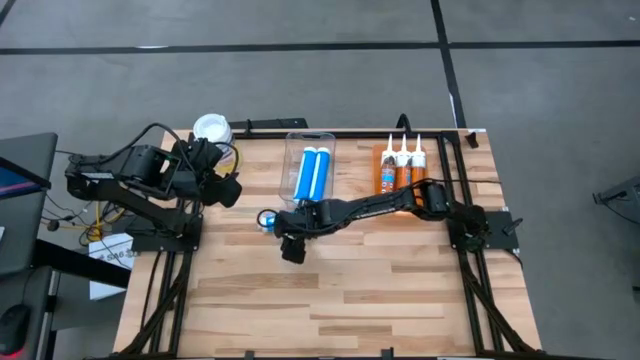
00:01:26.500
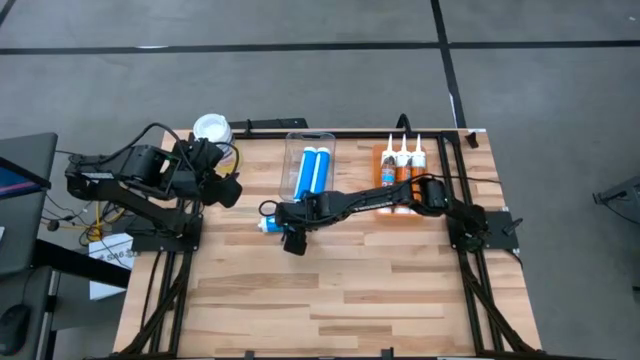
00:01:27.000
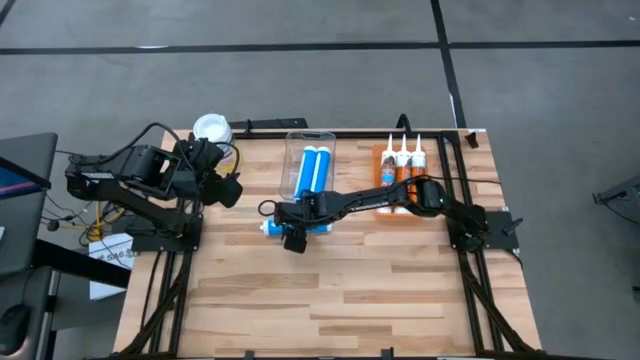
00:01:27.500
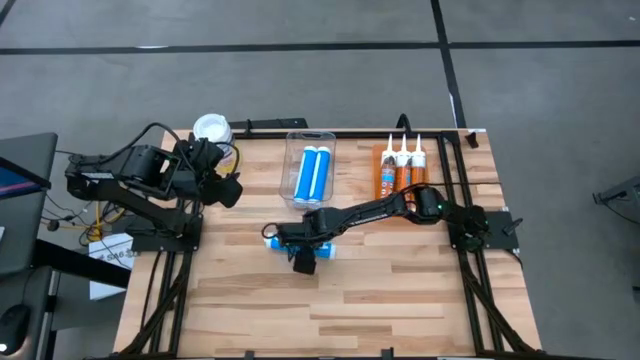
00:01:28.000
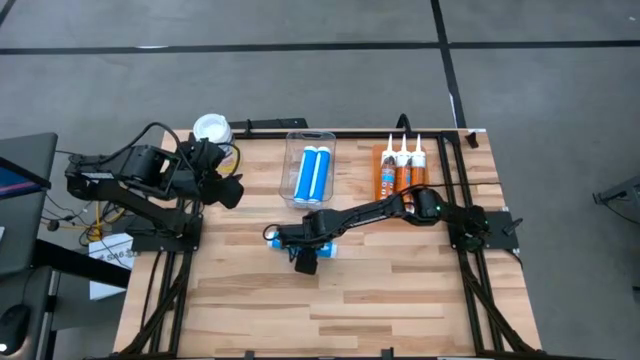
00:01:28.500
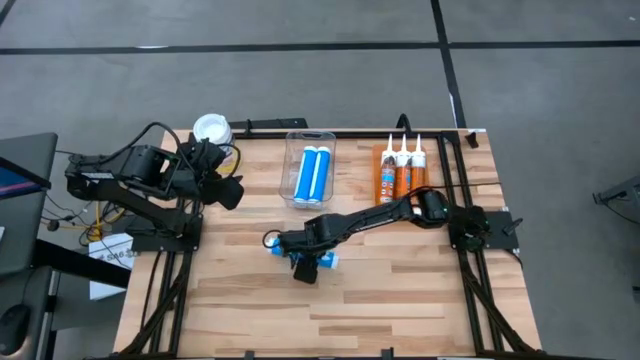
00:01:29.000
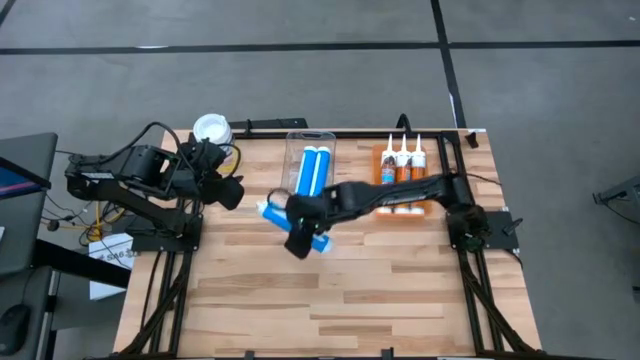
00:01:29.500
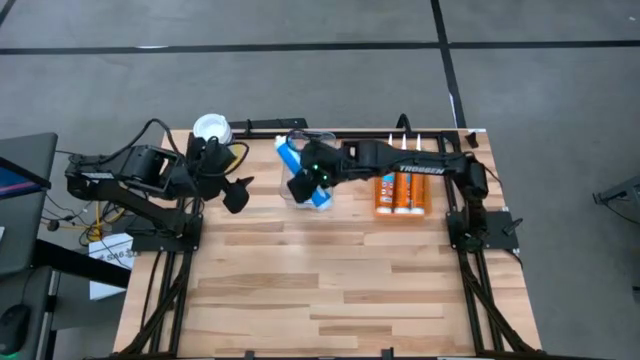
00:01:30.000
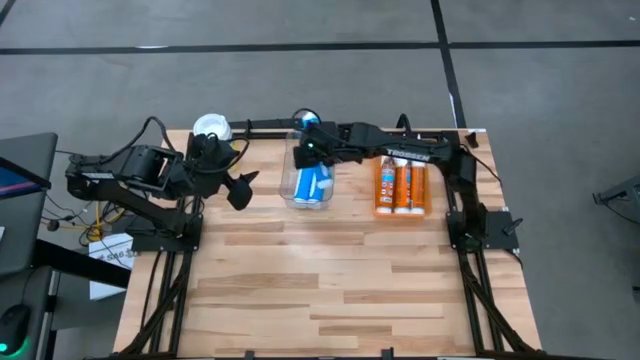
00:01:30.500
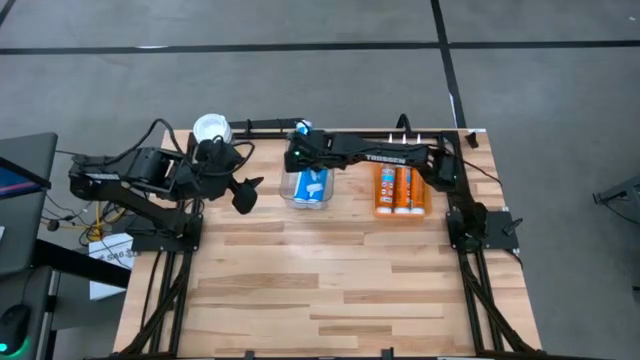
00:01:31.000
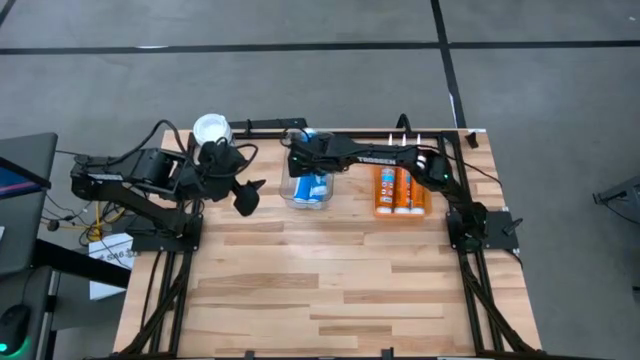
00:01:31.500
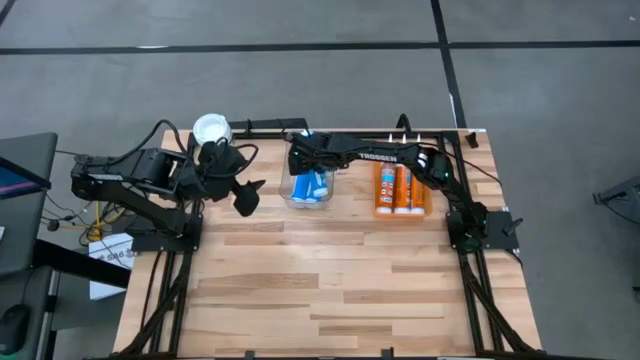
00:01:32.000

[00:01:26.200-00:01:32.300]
Task: Pick & place silicon tubes, Sealant and Lysol wipes
Put the blue sealant into the transparent bin

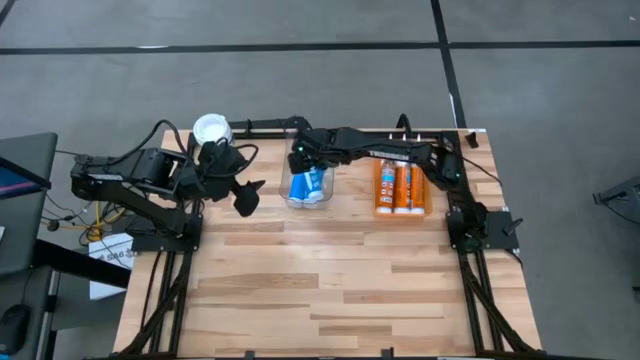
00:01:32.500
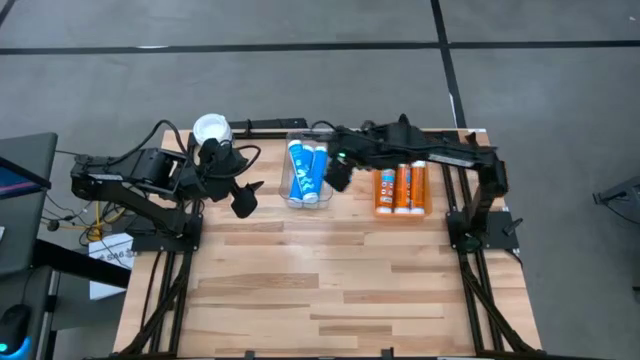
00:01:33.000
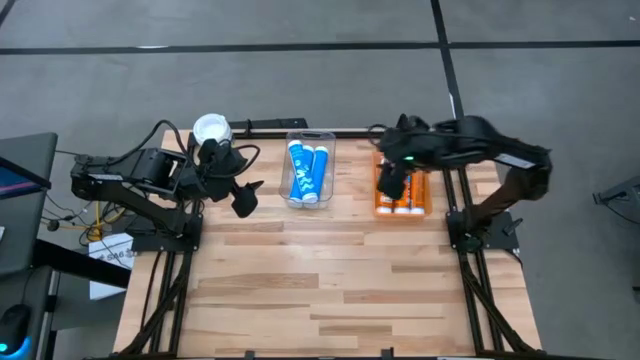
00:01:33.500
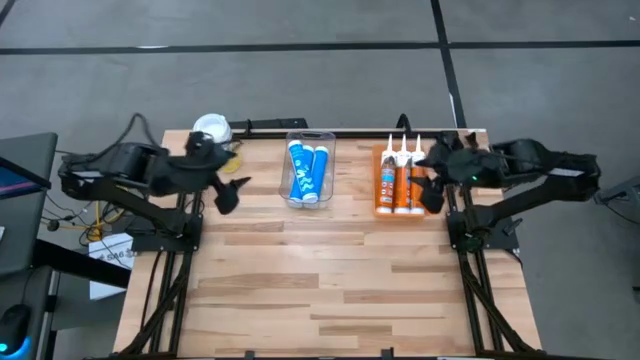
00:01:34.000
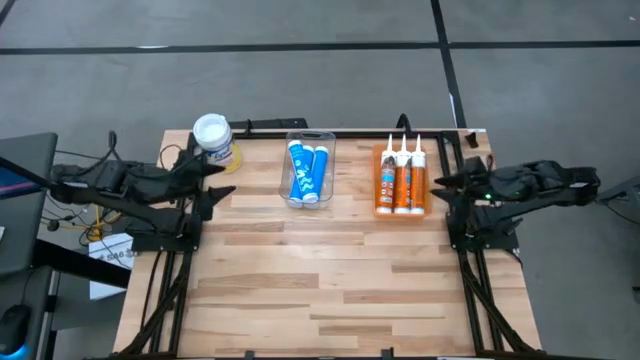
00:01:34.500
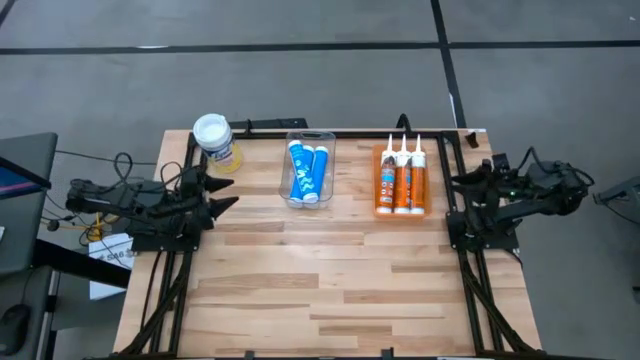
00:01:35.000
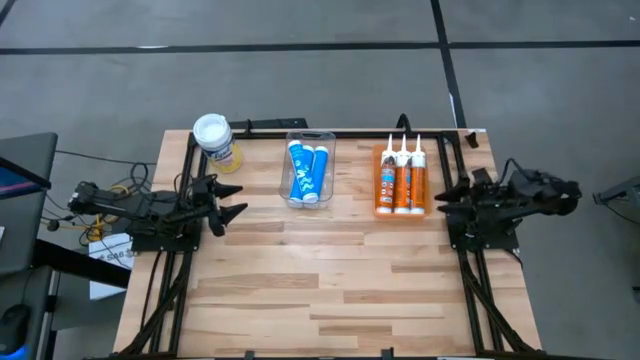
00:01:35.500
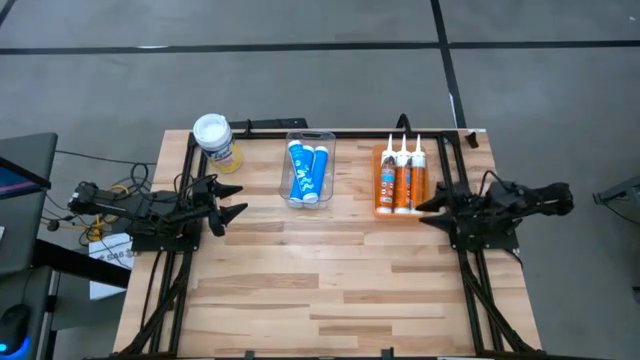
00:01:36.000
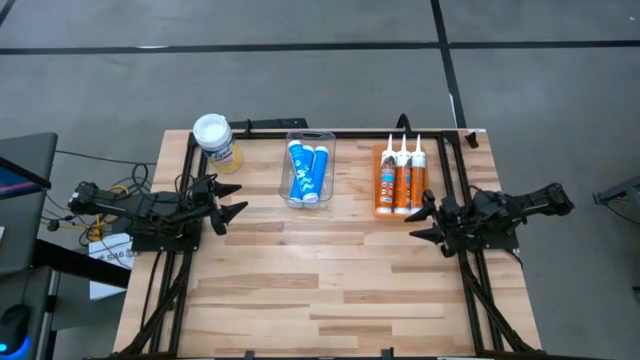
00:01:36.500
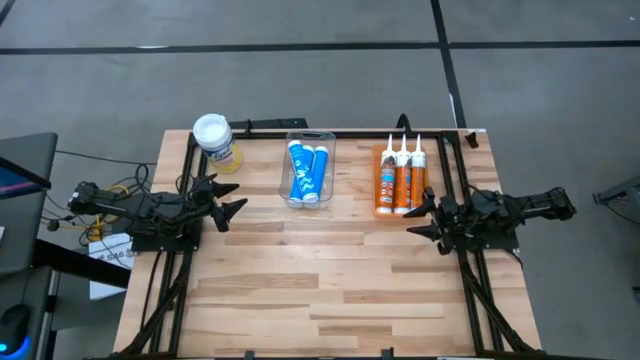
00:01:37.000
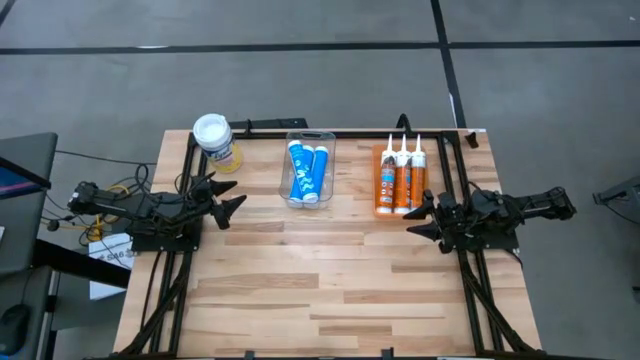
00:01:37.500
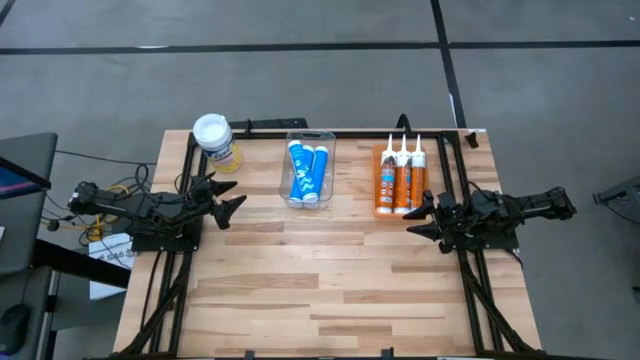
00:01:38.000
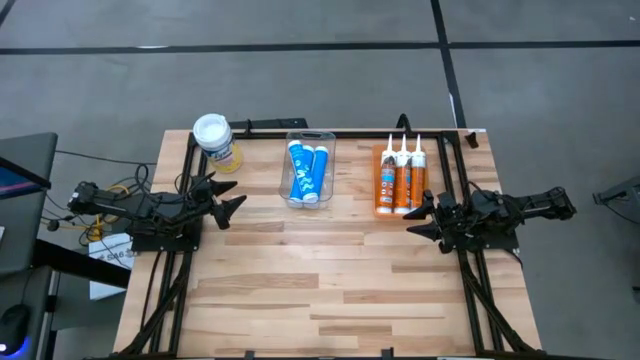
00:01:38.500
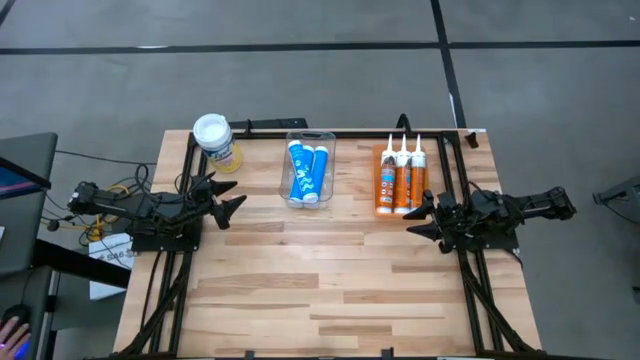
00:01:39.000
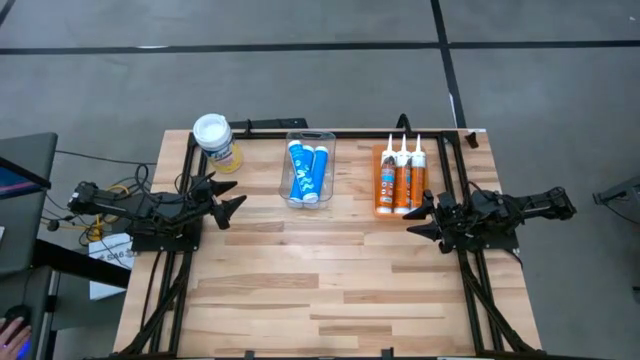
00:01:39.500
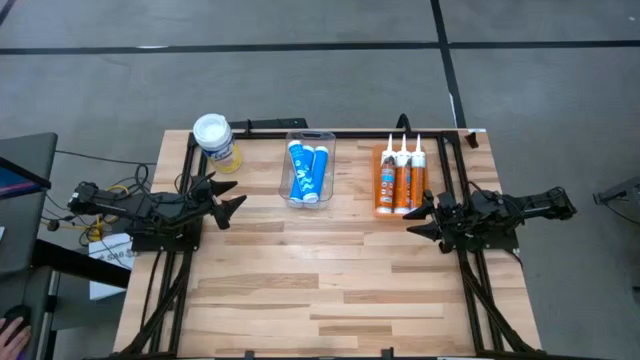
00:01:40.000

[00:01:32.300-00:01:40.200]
Return to Home Position

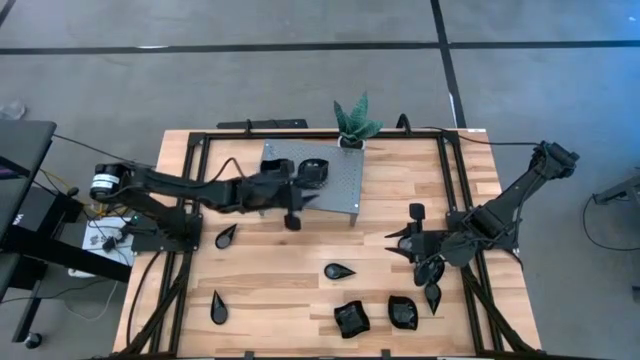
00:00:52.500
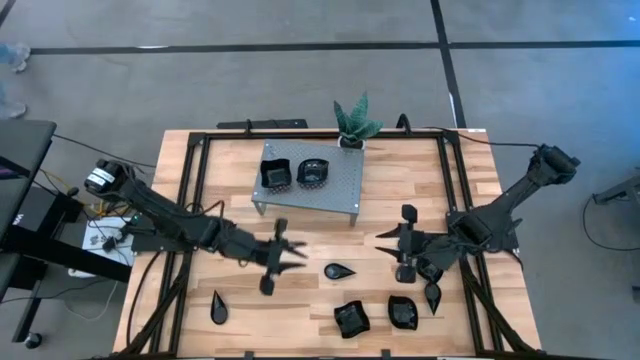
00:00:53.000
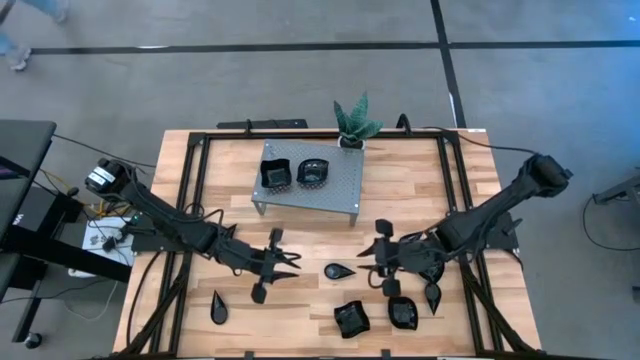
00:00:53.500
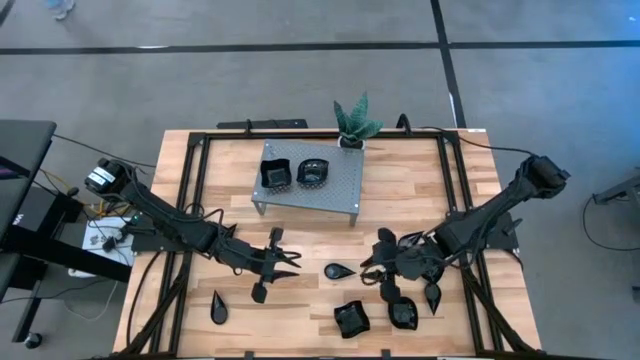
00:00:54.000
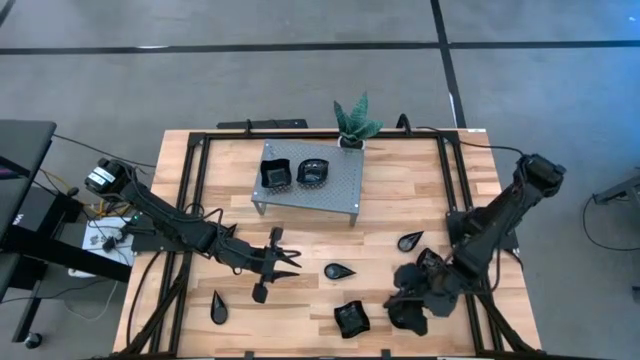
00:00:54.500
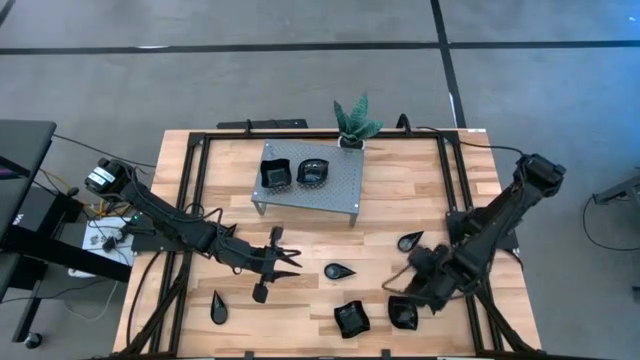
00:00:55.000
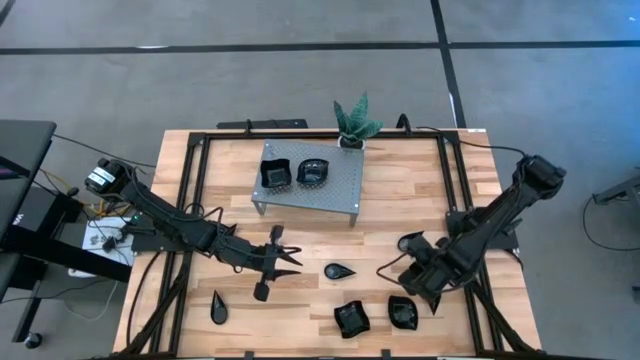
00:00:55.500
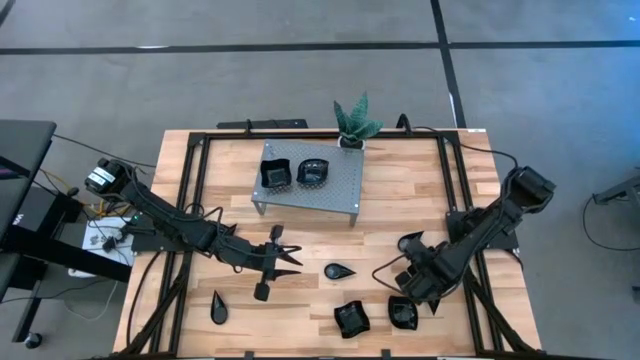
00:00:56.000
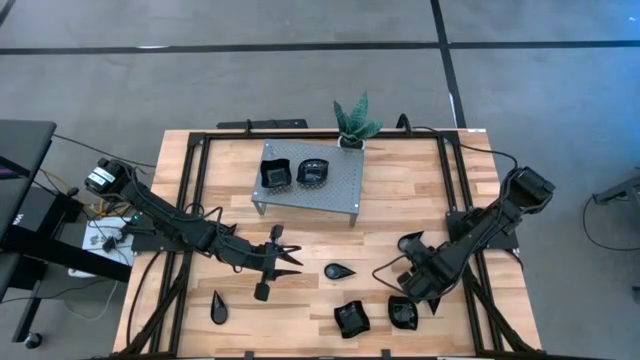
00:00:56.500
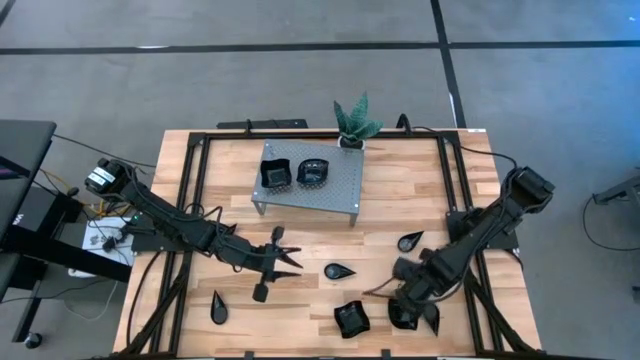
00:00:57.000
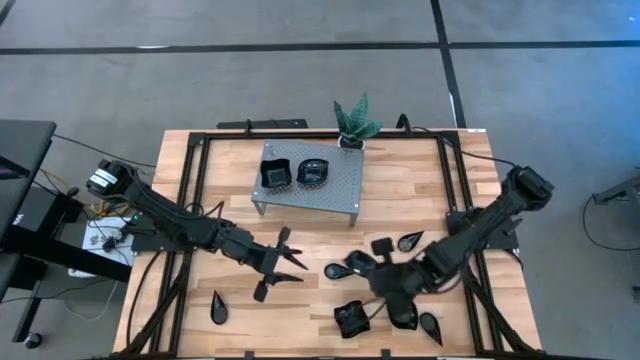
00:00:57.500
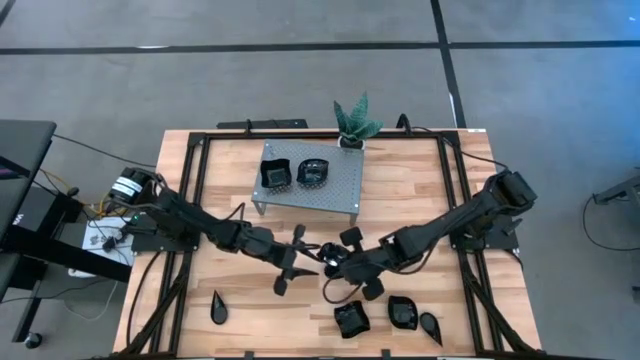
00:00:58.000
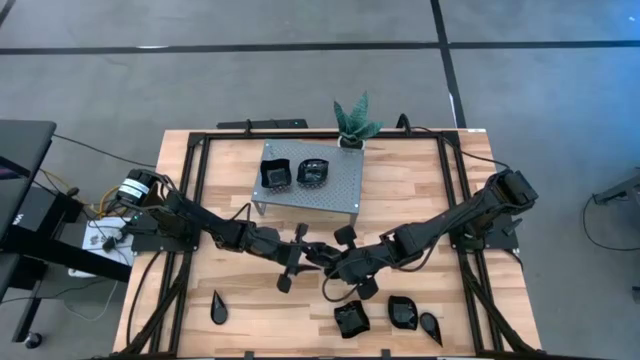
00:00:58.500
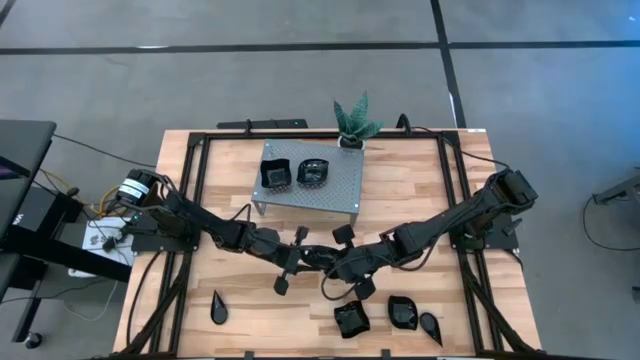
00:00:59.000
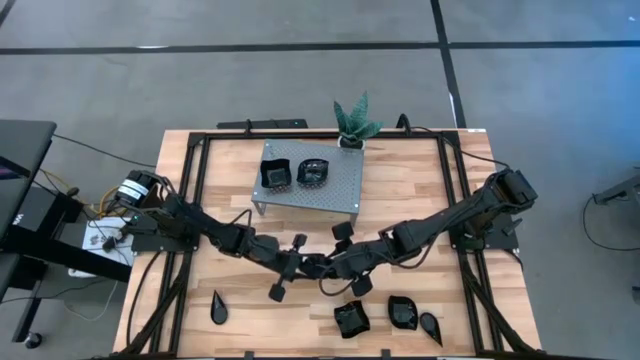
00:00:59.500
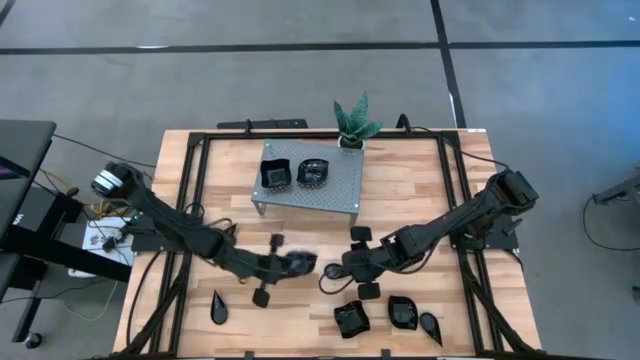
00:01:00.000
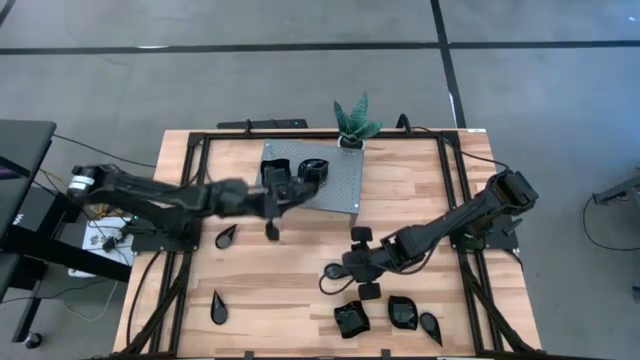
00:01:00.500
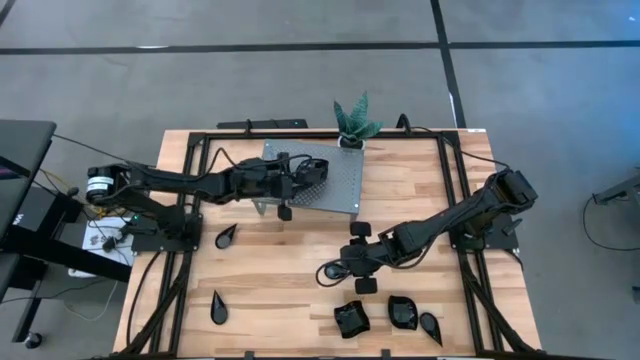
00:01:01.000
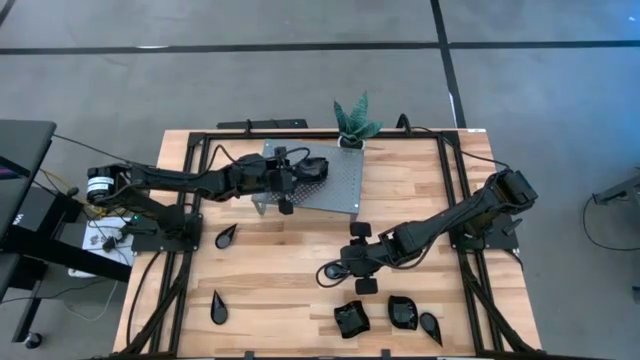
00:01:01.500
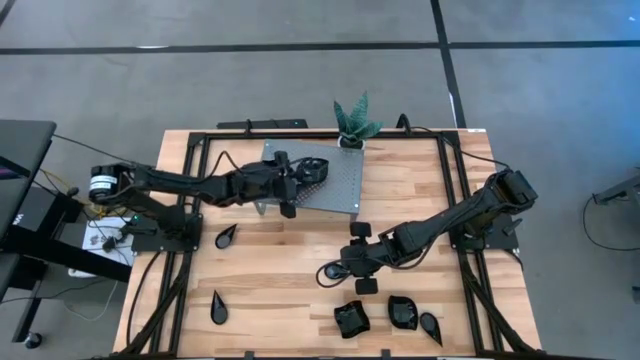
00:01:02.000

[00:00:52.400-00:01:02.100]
Task: Pick & Place Mini shaped plates
Stack the black leaf shaped plate on top of the stacked black leaf shaped plates on the shelf
